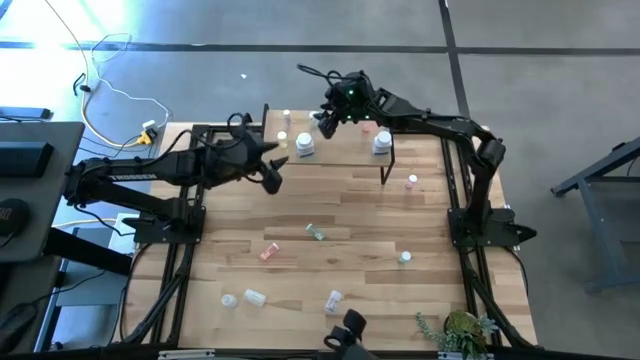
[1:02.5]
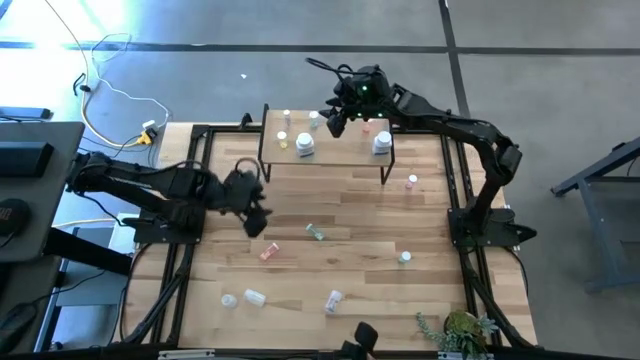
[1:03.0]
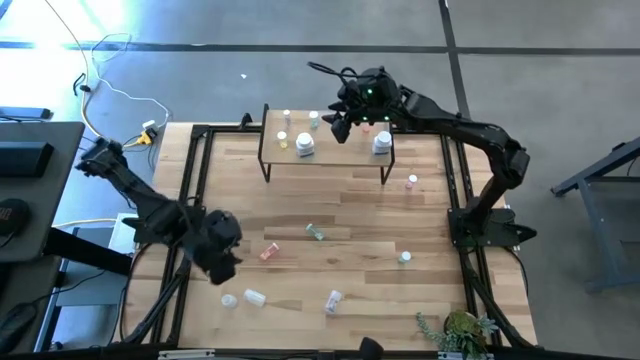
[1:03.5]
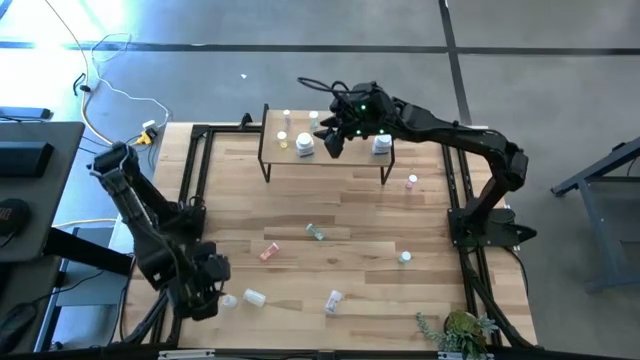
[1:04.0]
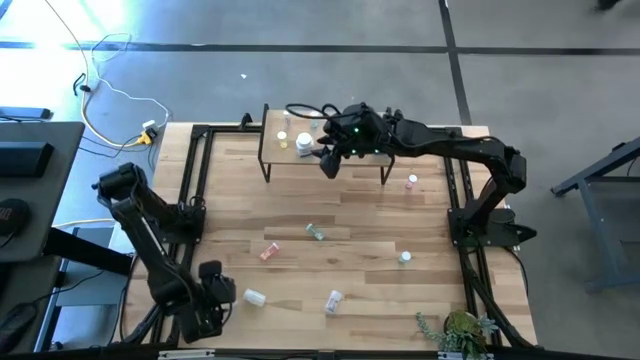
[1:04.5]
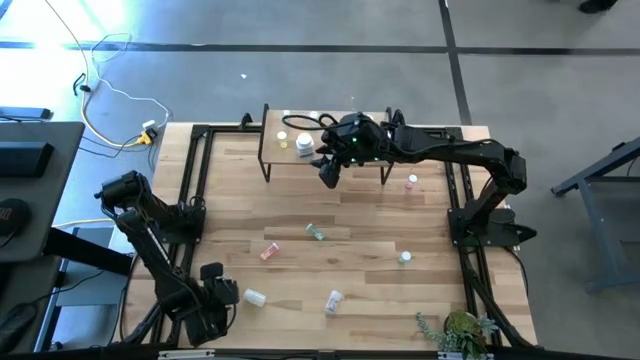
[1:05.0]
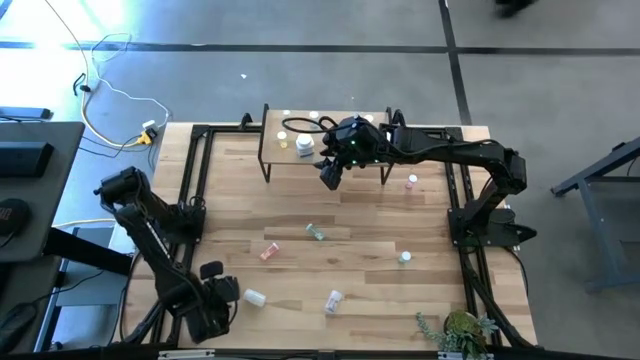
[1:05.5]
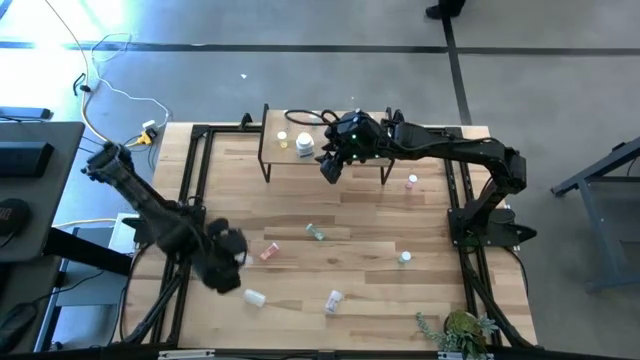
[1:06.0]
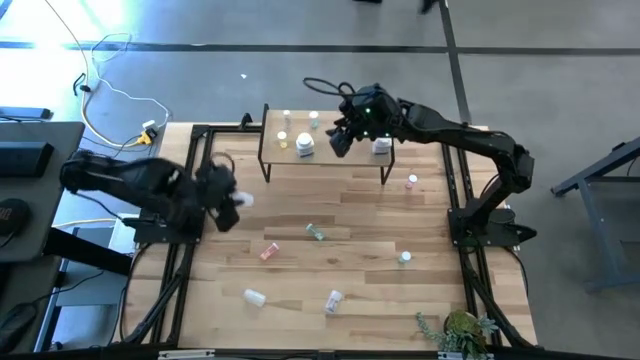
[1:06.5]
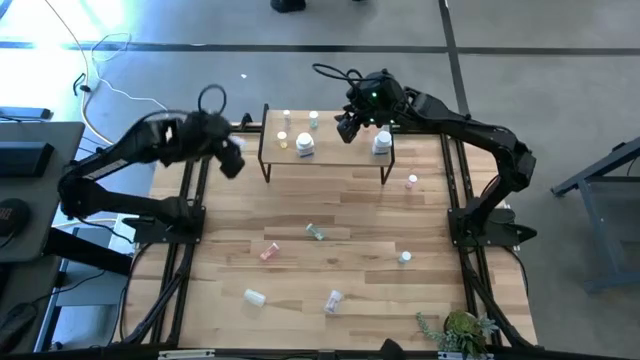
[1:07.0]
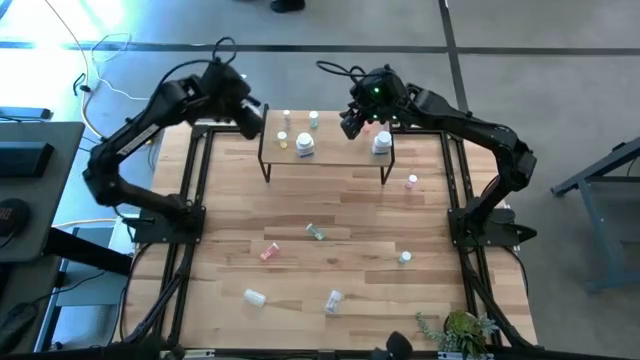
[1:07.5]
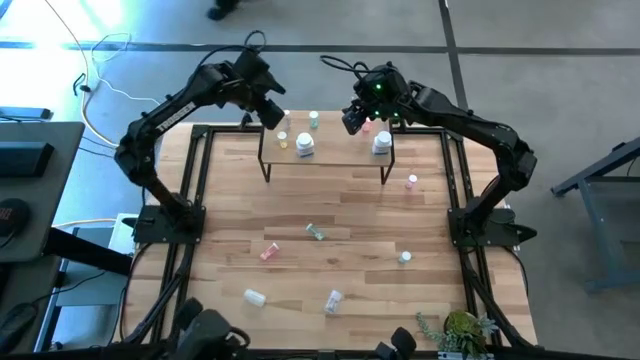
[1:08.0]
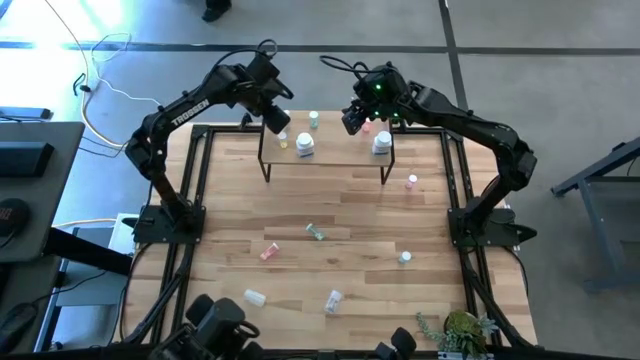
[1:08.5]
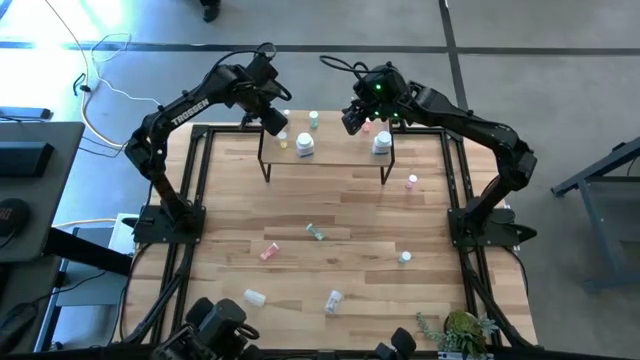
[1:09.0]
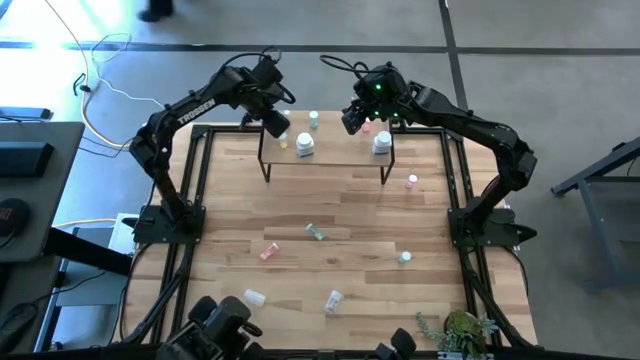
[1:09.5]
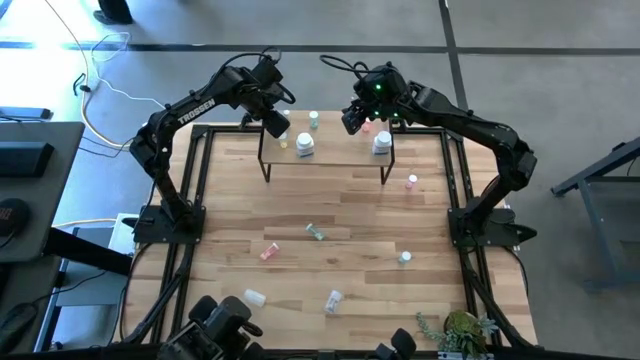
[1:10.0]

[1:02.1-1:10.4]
Task: Pick and place medicine bottles onto shelf by color
Put the white pill bottle on the shelf

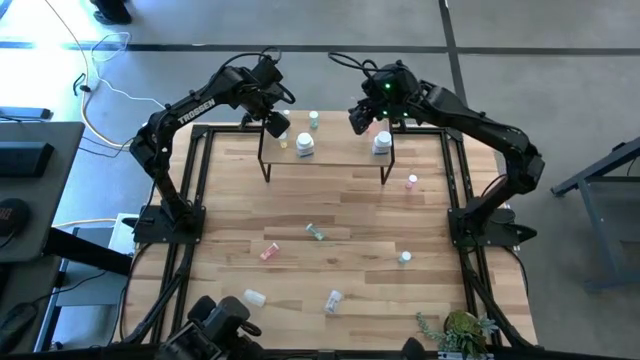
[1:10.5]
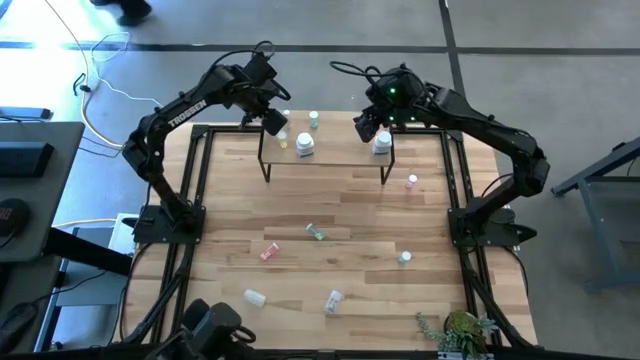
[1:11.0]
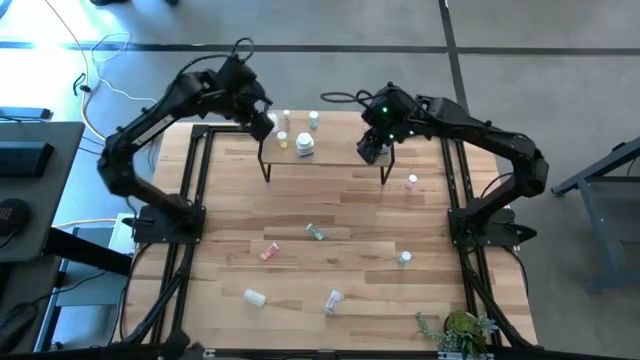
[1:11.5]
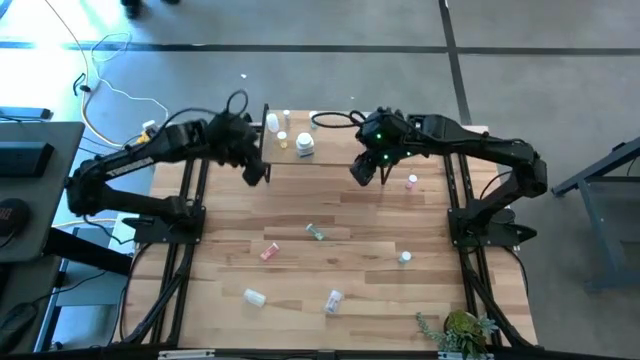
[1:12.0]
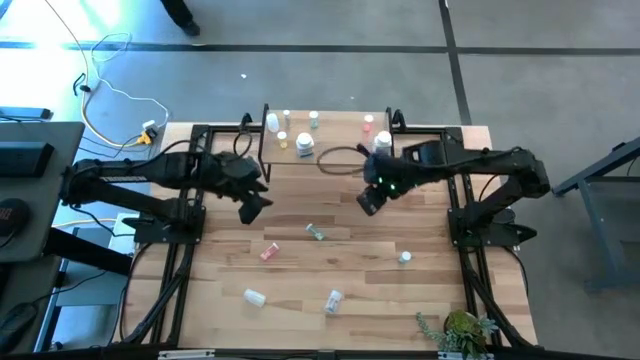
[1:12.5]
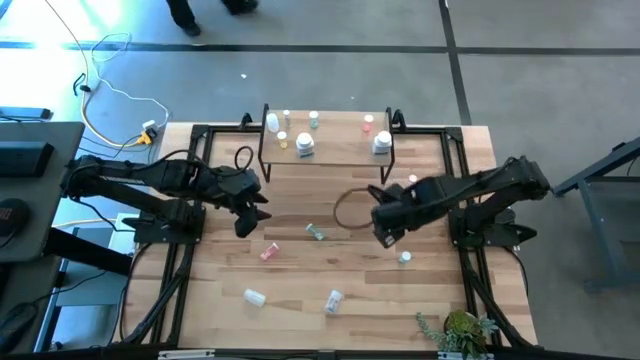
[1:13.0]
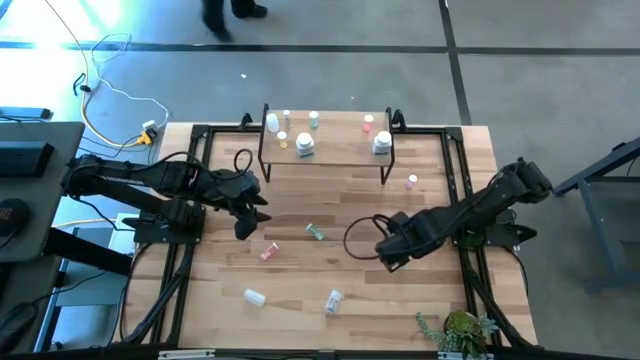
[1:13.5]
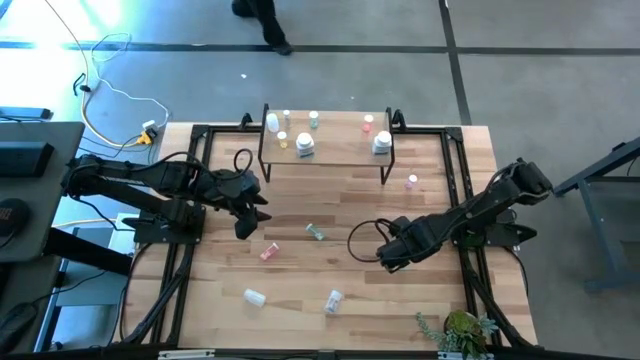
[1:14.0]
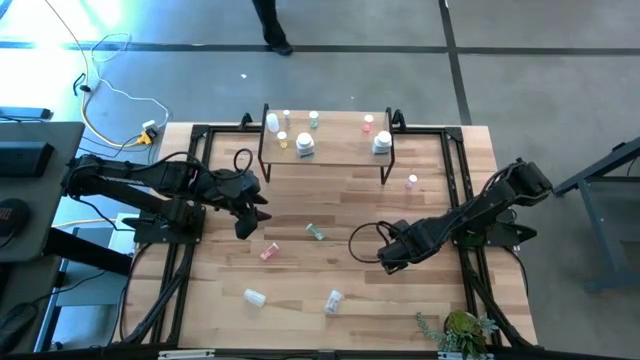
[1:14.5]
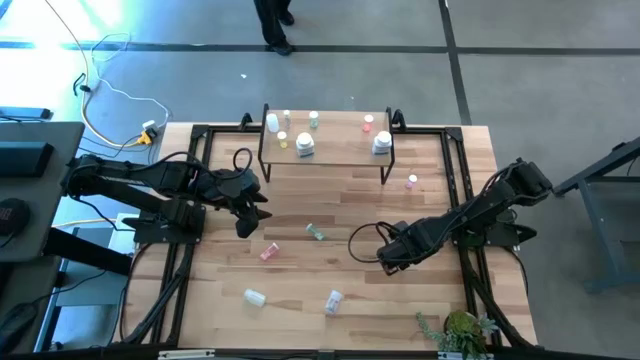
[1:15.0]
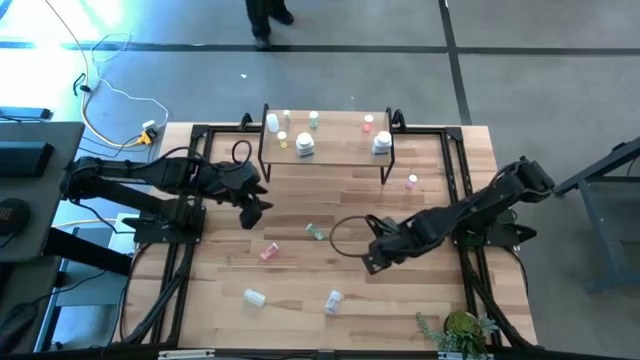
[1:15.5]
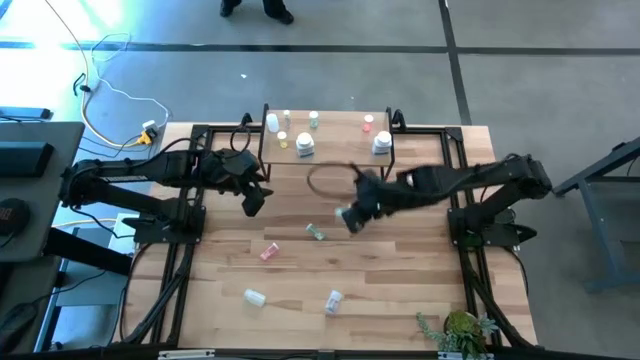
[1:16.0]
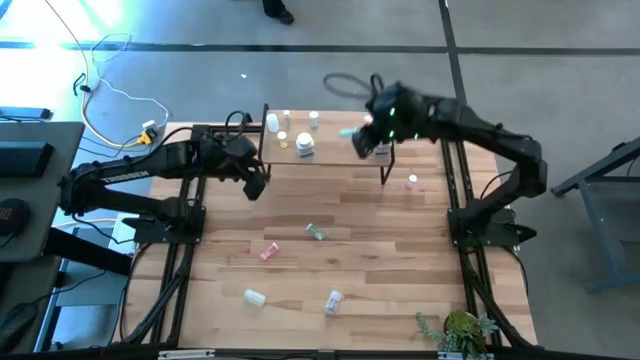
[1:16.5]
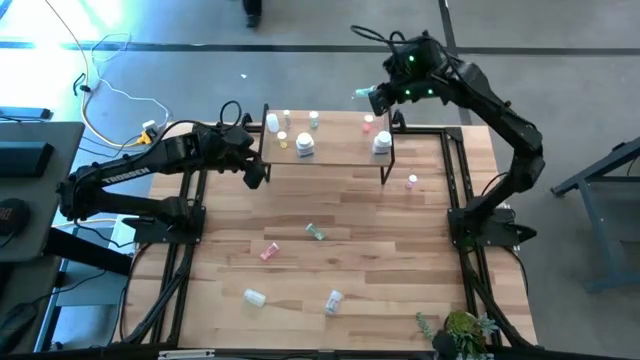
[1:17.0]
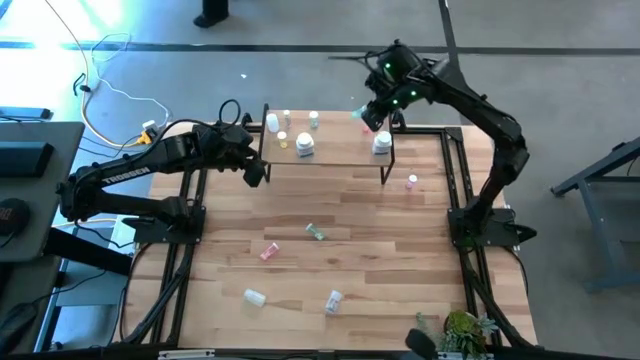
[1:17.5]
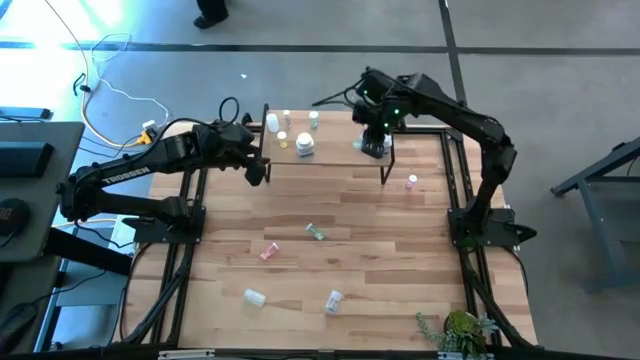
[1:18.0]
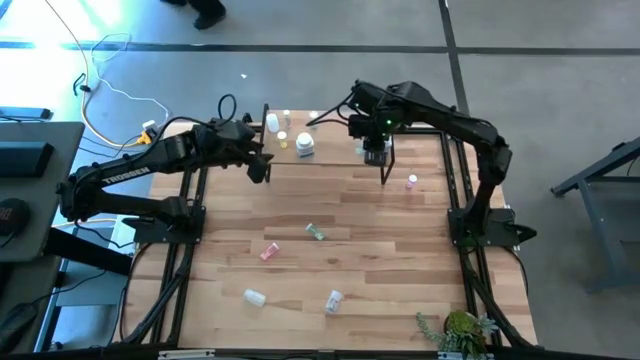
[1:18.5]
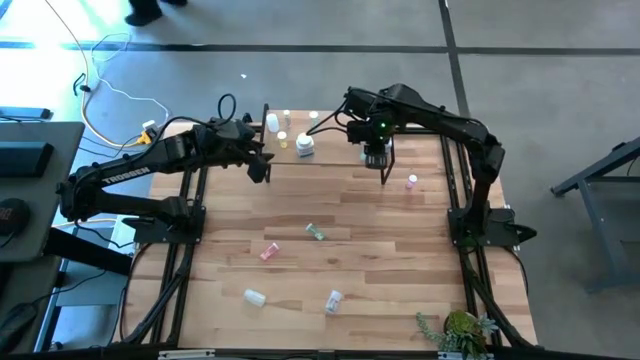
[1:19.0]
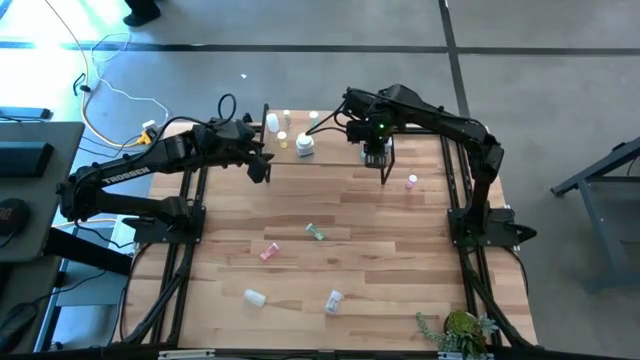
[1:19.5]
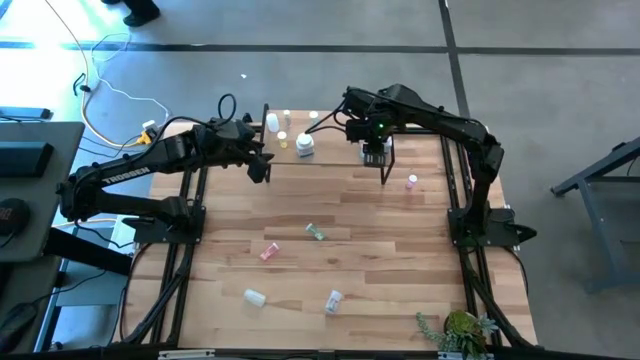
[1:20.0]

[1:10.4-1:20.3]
Put the right blue pill bottle on the shelf

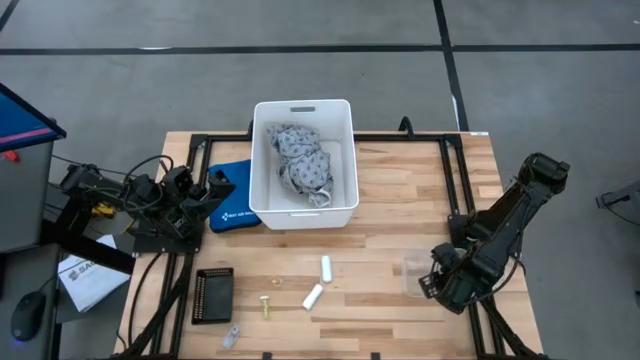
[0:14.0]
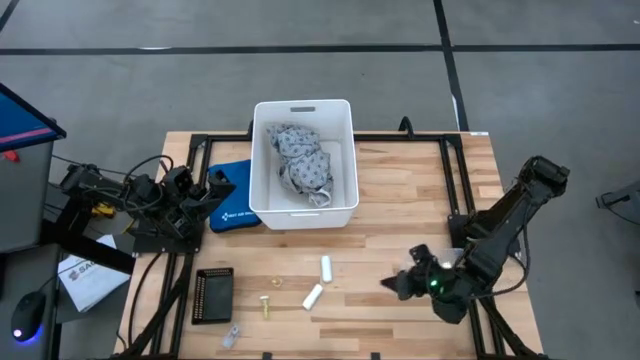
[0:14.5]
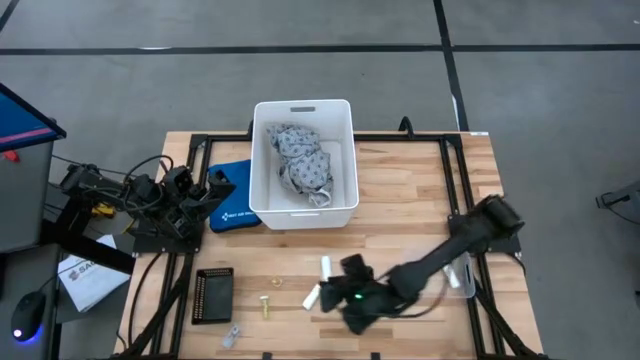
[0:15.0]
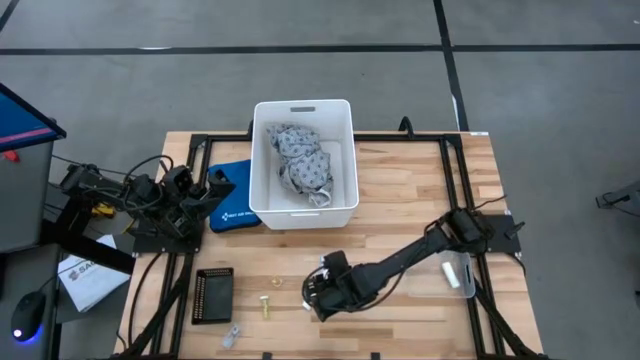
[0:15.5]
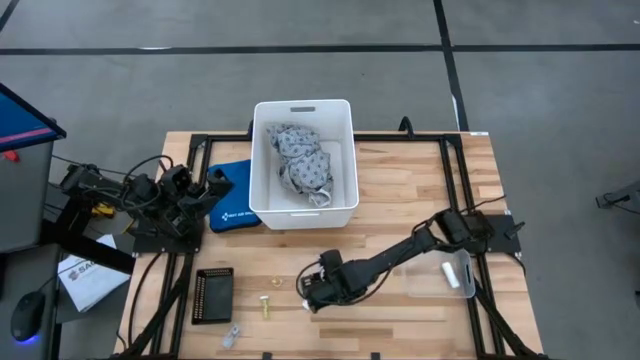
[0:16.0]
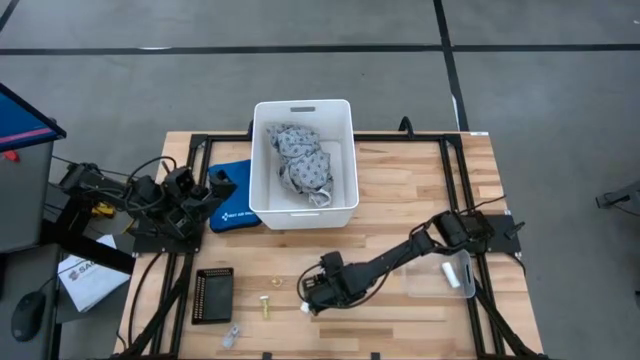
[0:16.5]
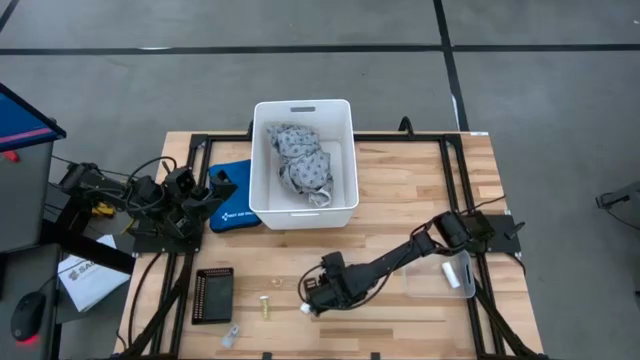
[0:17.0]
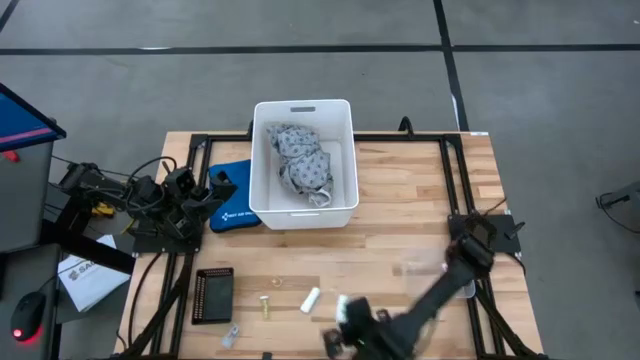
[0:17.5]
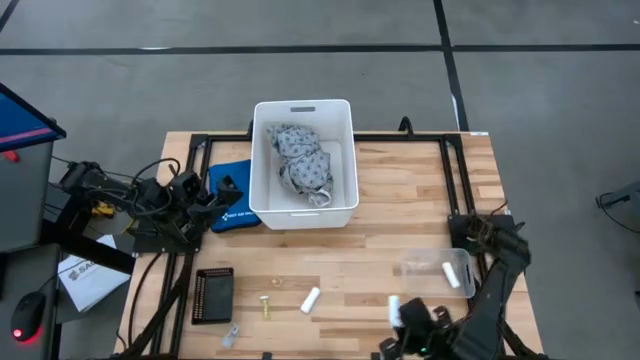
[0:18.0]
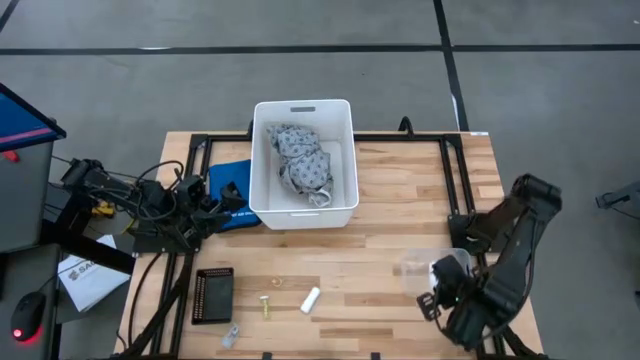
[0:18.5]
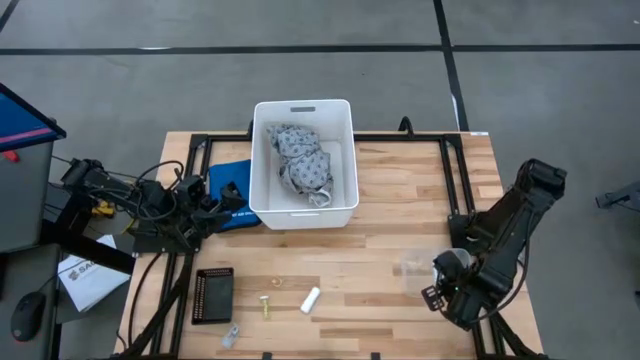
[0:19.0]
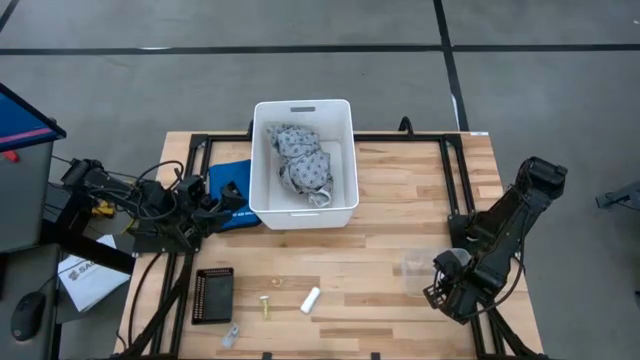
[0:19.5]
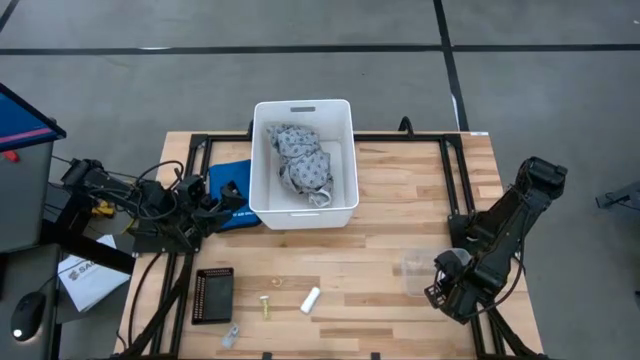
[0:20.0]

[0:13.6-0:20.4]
Task: Pick & Place Medicine items
Put the top rolled gauze into the transparent bin
